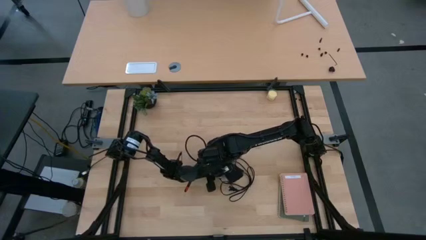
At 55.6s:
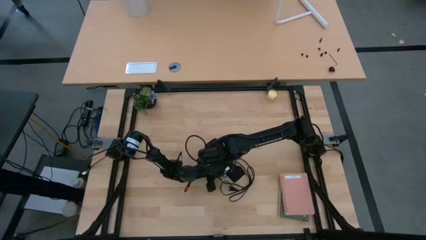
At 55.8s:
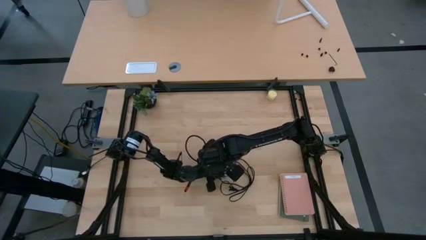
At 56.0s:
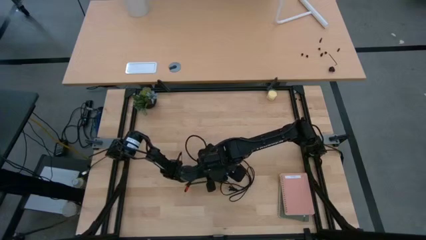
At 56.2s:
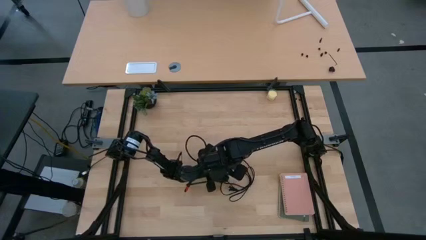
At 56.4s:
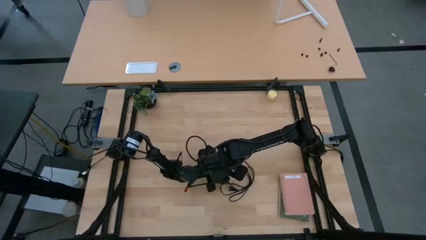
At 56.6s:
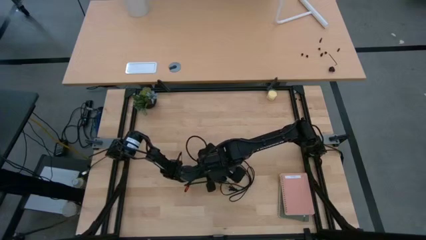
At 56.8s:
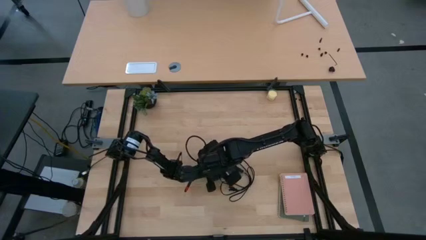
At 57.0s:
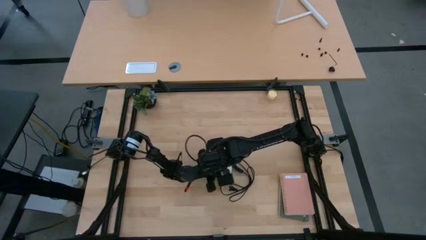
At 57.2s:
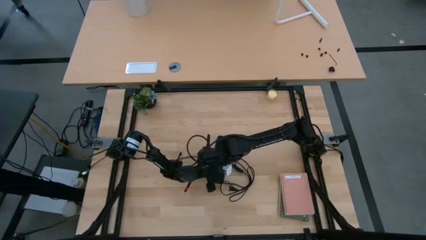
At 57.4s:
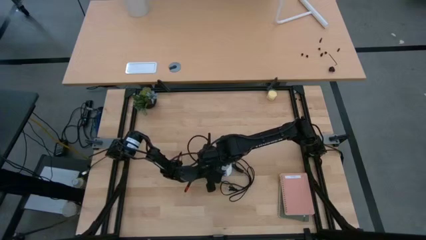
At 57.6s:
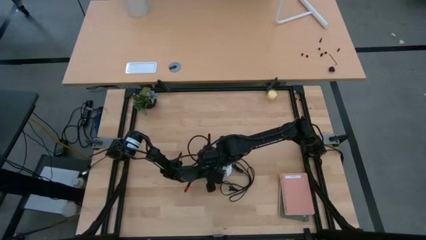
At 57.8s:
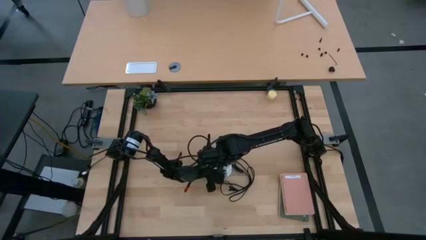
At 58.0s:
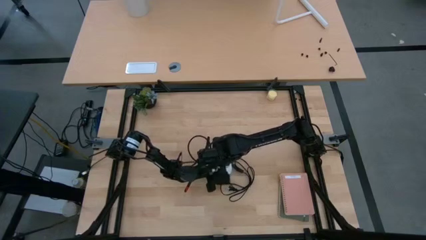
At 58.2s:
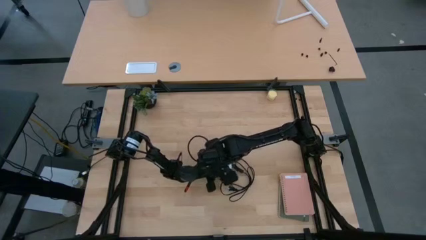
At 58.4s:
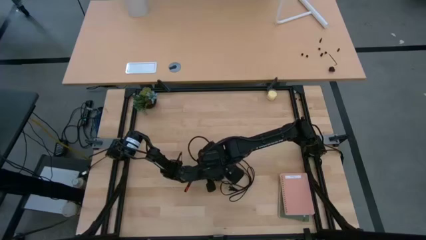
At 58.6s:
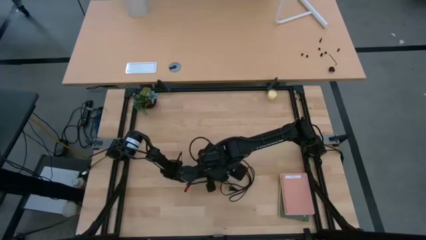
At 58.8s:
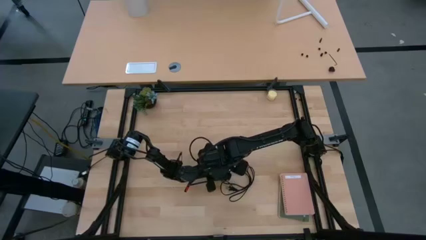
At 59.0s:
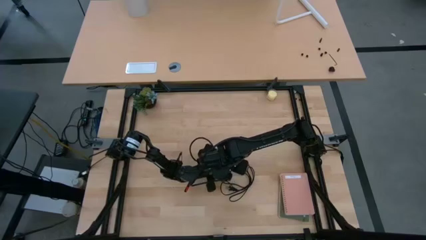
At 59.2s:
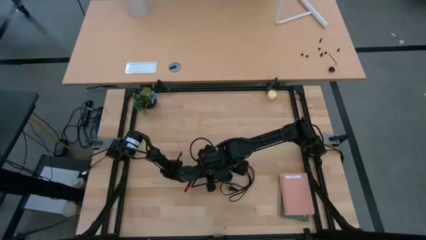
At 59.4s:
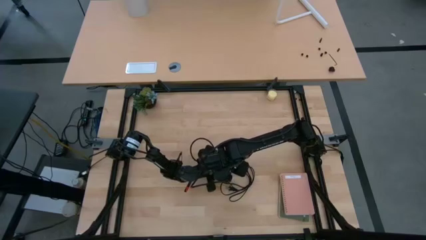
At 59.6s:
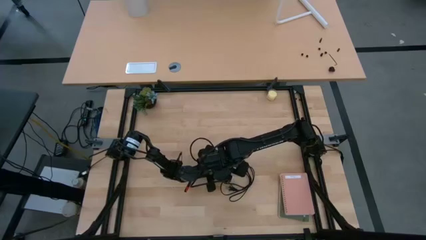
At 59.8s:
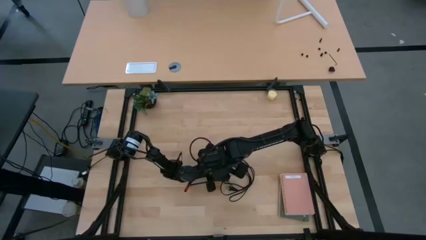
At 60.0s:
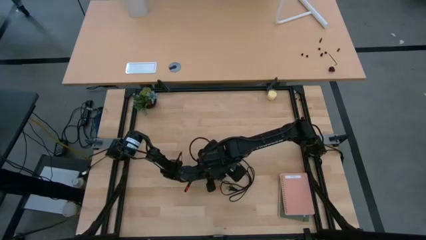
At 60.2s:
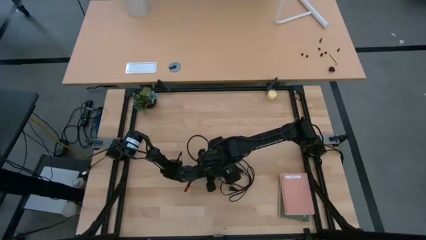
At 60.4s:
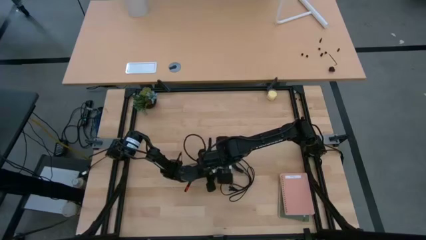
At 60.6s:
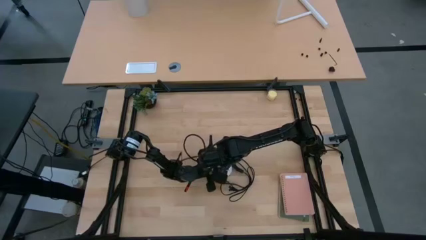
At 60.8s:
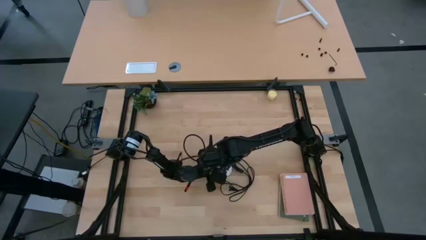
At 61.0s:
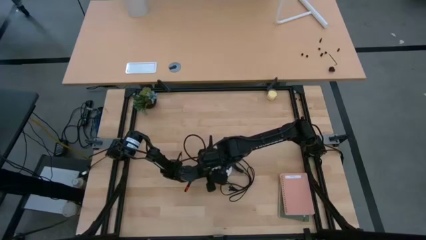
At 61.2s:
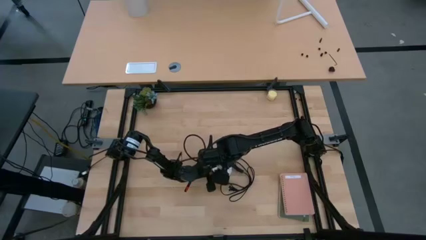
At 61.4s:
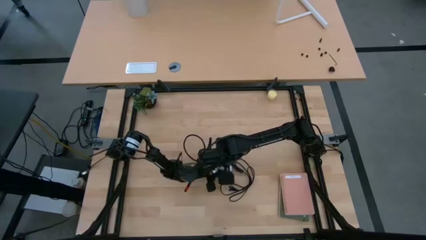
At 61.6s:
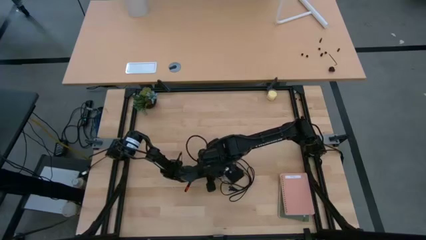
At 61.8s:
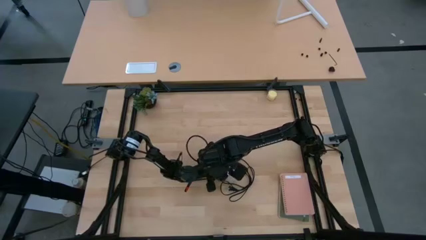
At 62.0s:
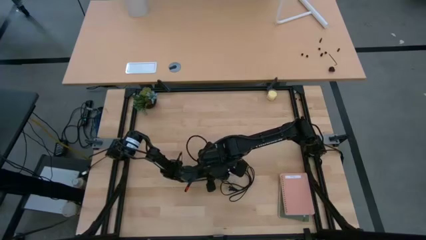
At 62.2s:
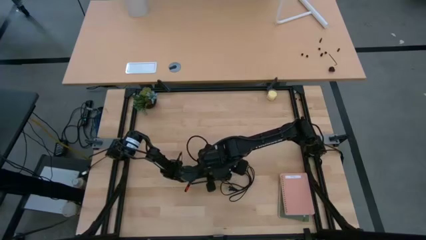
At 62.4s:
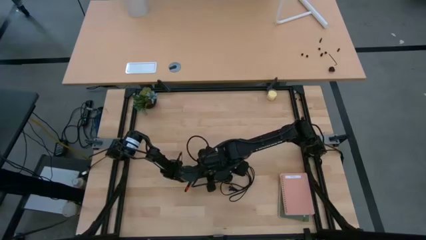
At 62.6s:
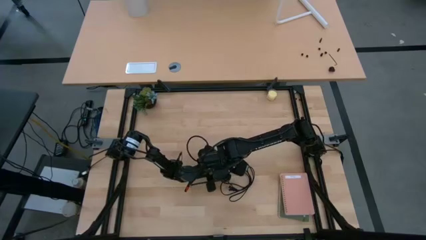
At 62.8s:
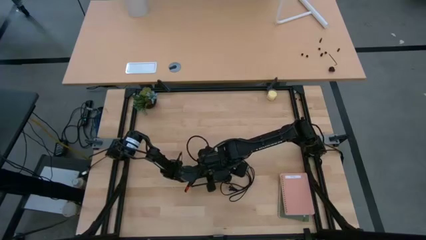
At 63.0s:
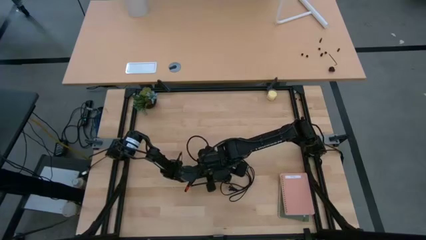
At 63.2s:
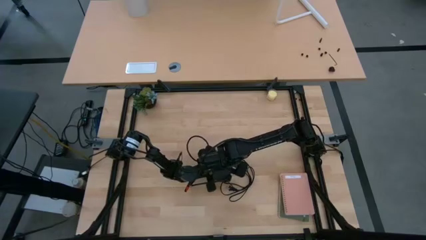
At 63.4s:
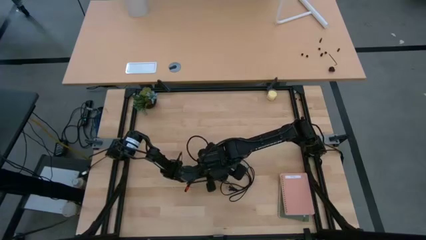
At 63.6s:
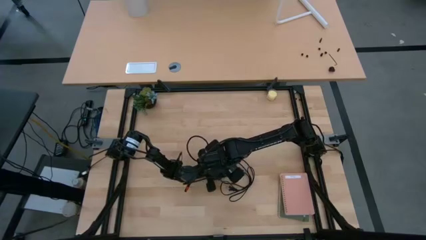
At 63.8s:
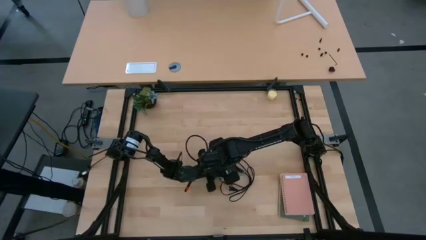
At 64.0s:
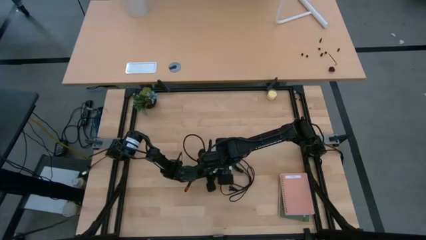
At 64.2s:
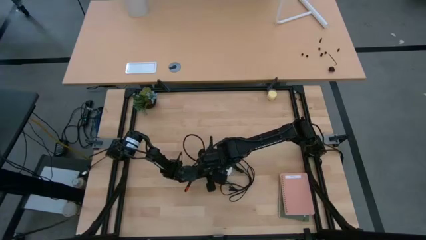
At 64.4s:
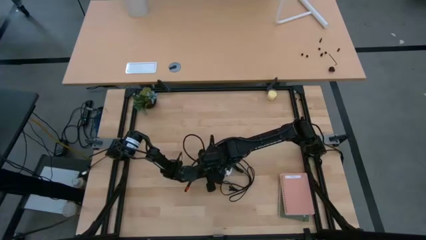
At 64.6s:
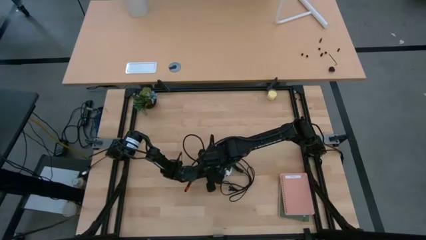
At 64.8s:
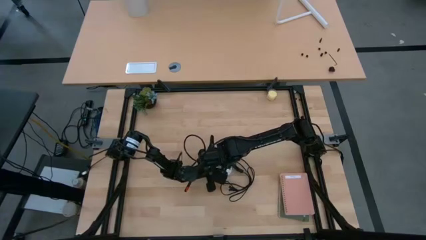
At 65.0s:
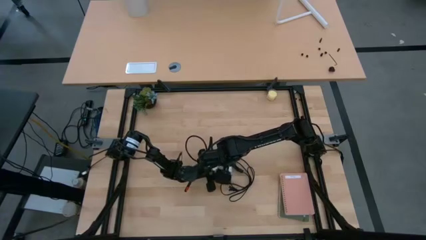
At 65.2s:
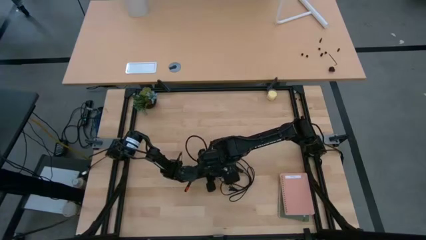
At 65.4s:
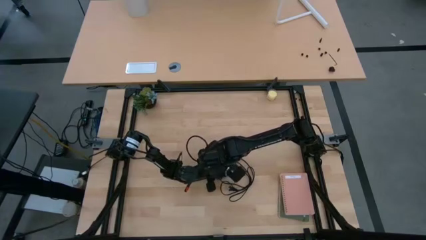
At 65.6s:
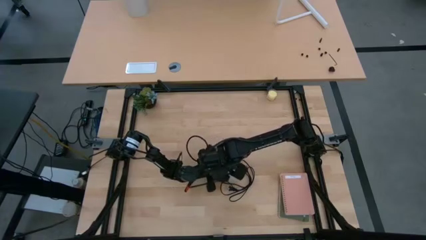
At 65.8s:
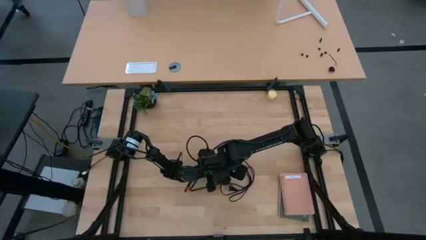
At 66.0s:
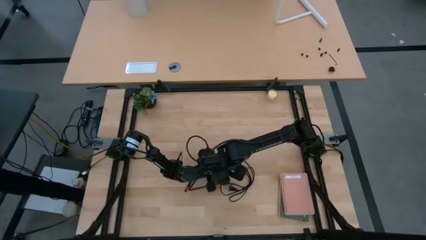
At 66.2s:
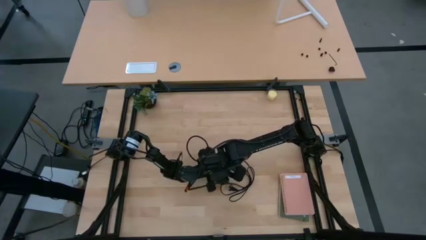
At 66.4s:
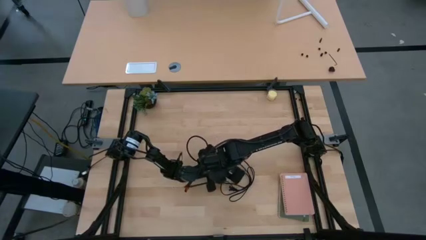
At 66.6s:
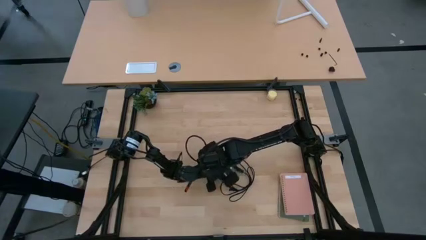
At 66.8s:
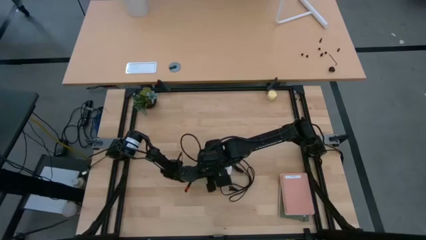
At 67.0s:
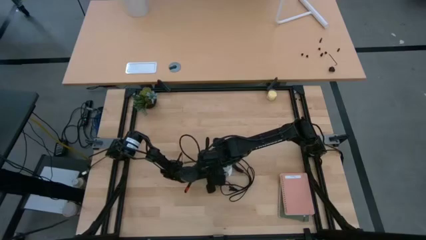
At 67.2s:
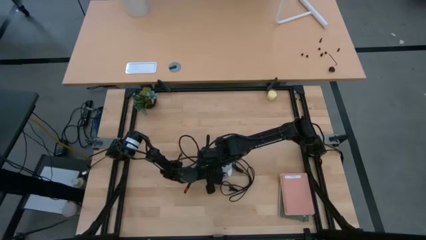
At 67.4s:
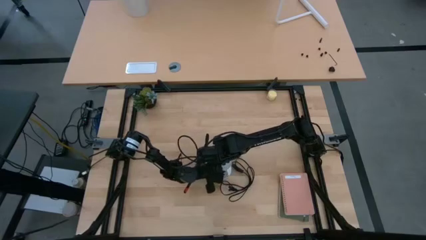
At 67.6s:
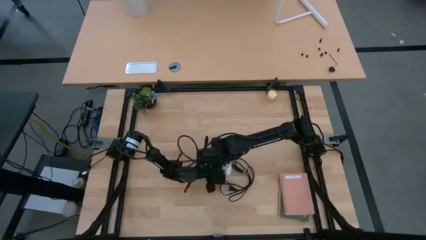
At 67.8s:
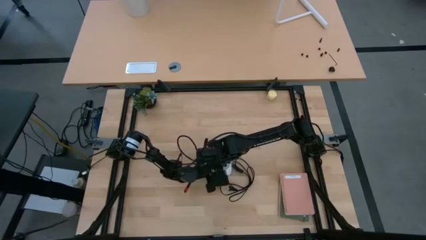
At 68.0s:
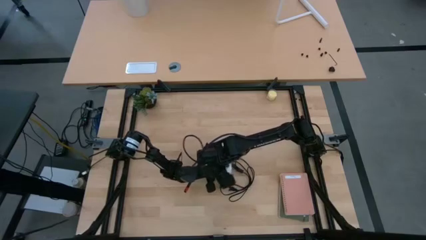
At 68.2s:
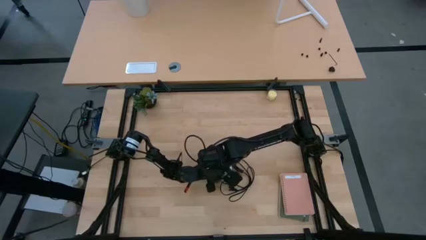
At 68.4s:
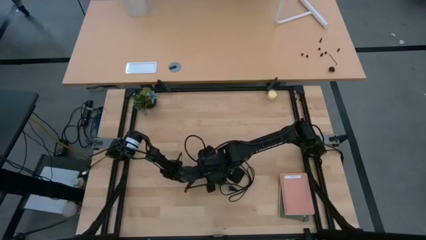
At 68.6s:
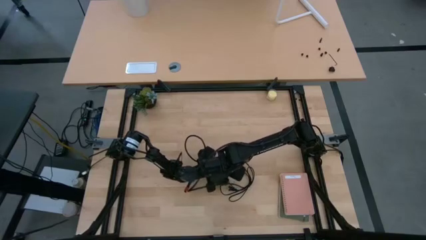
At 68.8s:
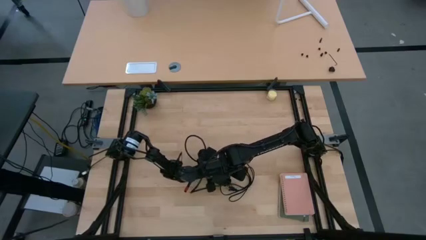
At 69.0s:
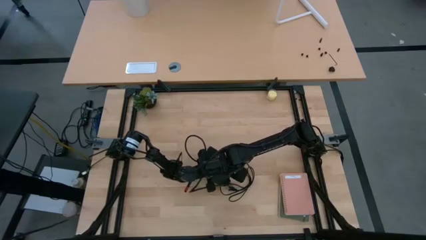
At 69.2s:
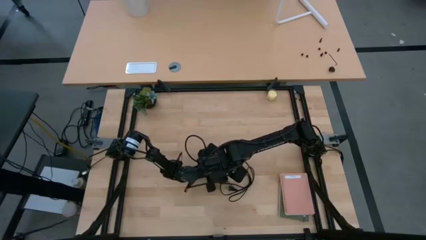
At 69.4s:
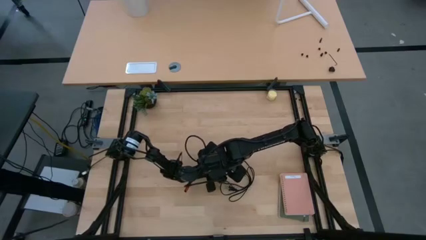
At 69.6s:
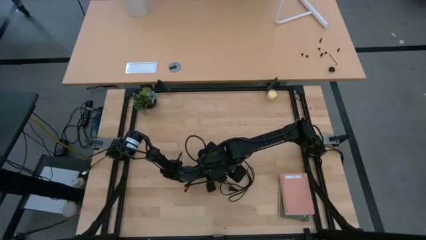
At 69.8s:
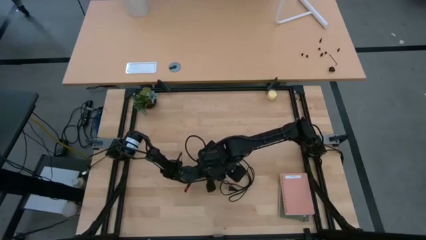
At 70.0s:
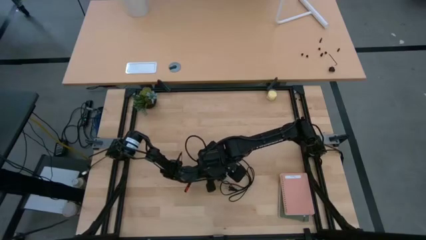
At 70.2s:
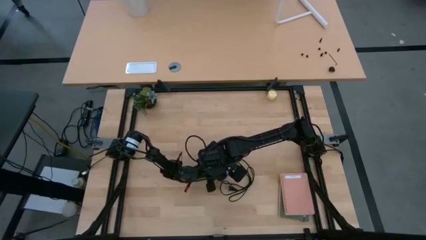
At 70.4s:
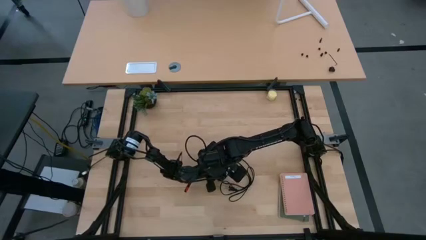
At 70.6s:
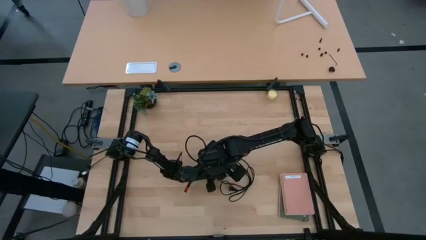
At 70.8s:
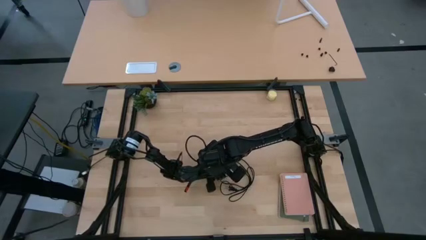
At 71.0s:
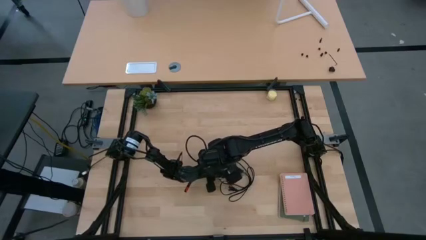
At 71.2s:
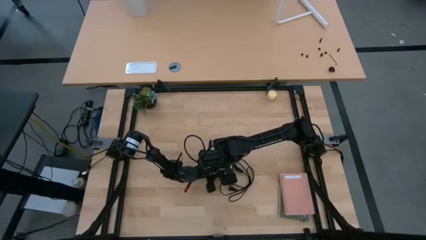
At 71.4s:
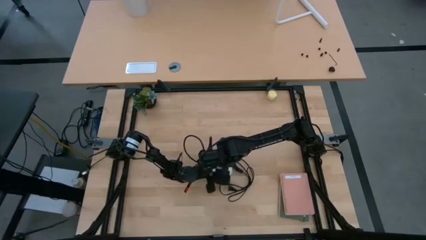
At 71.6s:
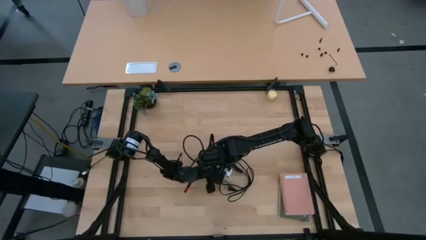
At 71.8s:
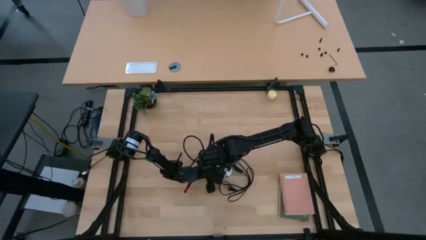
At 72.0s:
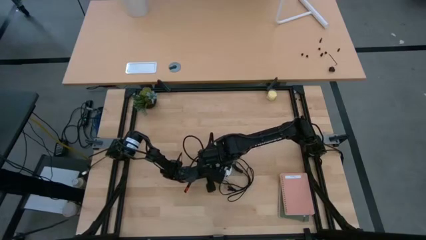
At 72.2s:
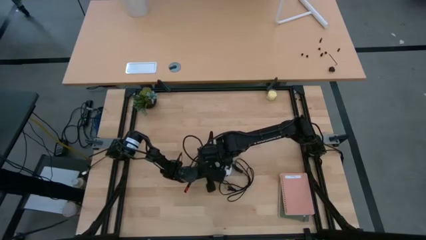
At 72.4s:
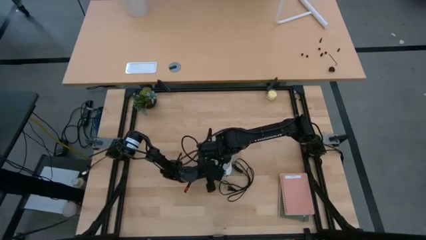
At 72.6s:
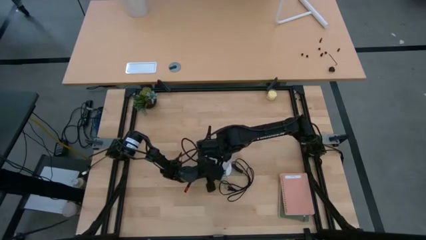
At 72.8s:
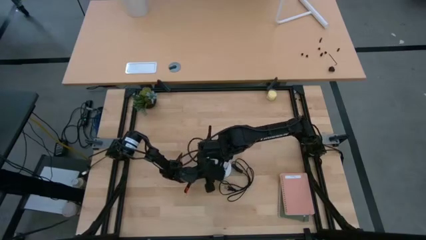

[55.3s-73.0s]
Task: Screw lightbulb
Insert the white lightbulb into the silver lamp
